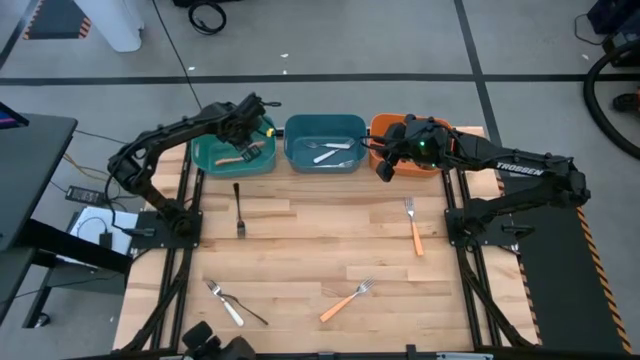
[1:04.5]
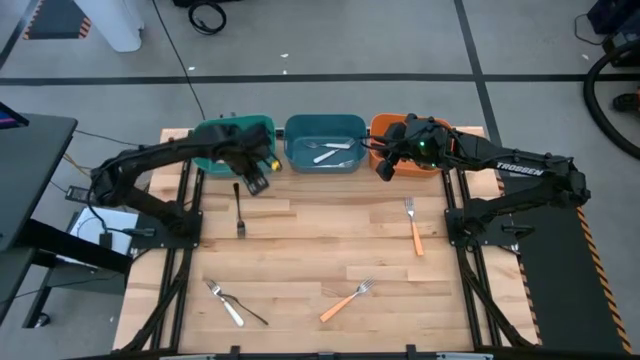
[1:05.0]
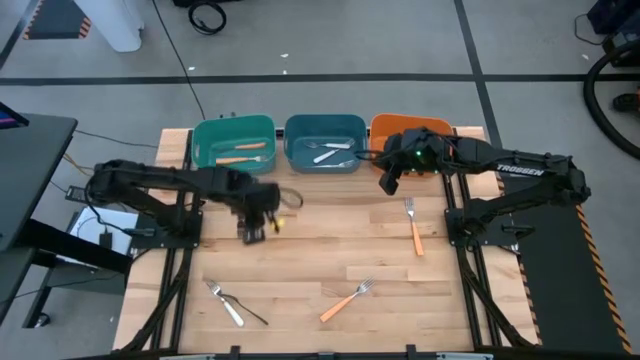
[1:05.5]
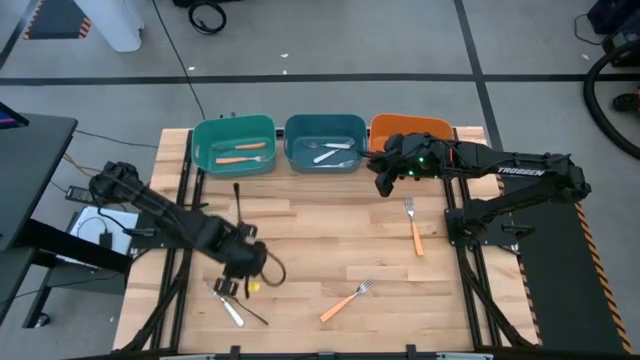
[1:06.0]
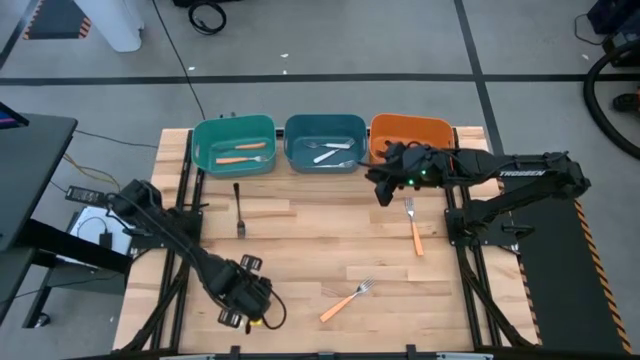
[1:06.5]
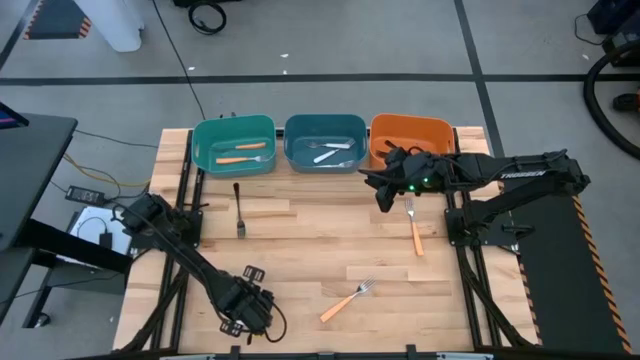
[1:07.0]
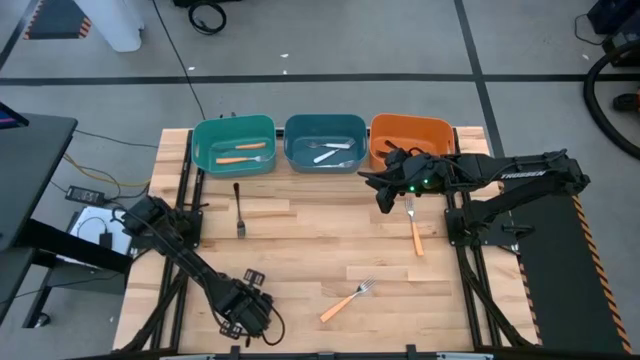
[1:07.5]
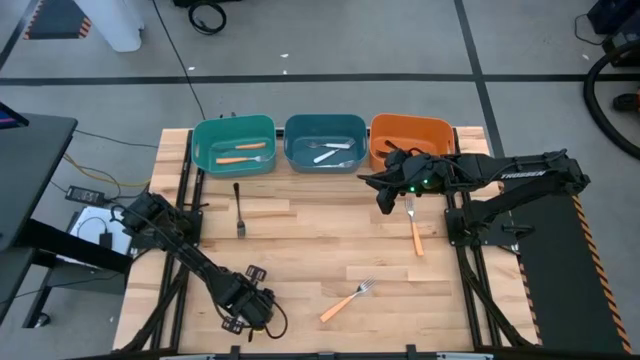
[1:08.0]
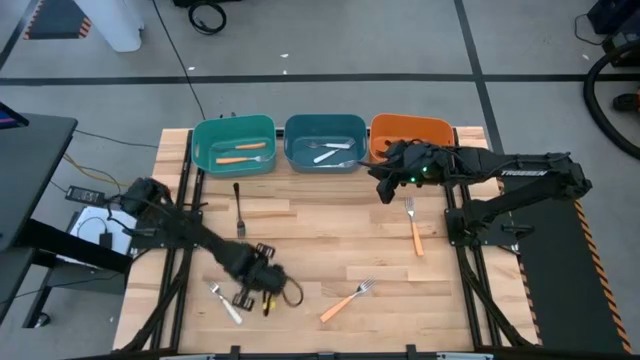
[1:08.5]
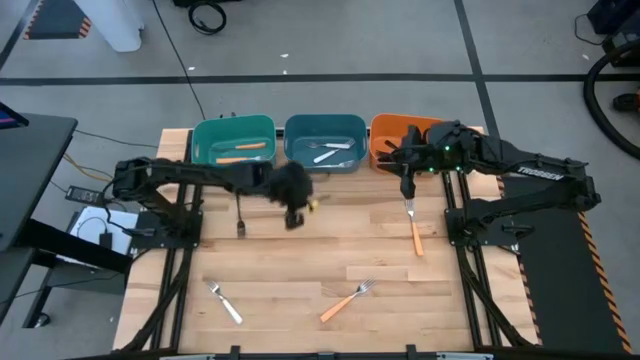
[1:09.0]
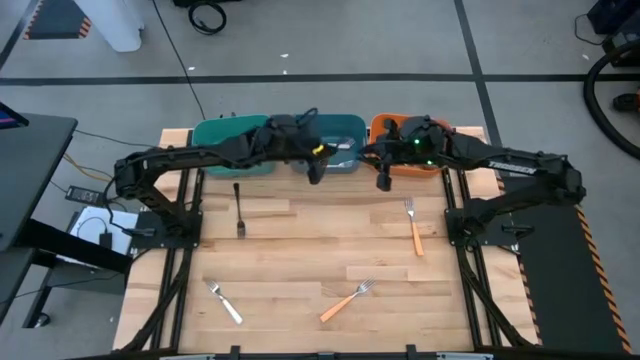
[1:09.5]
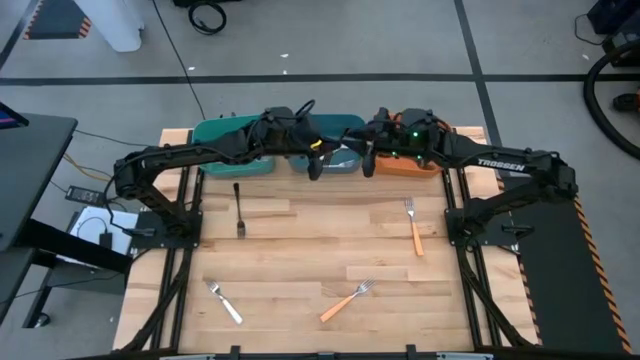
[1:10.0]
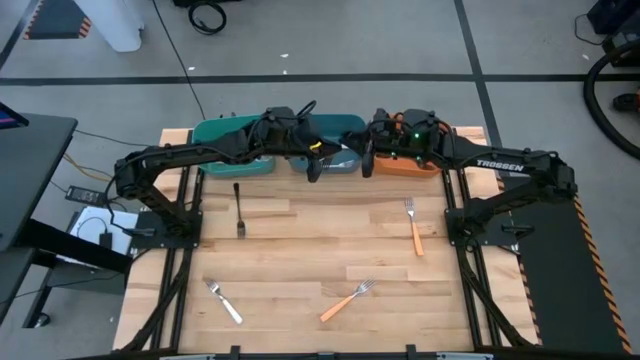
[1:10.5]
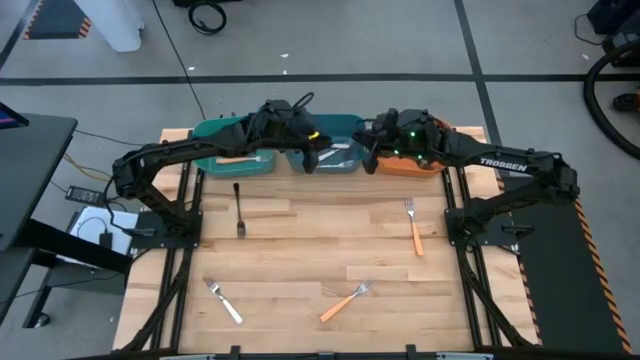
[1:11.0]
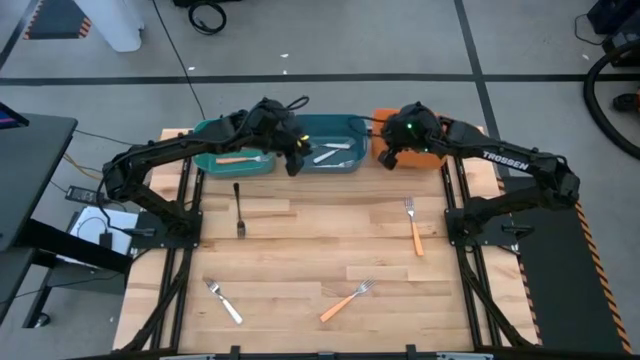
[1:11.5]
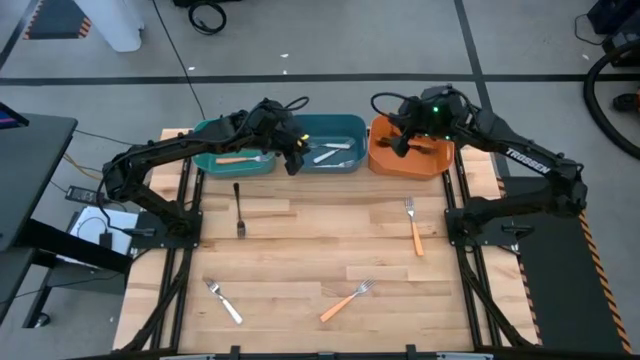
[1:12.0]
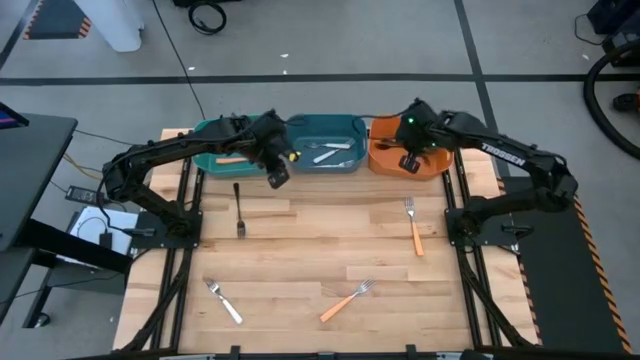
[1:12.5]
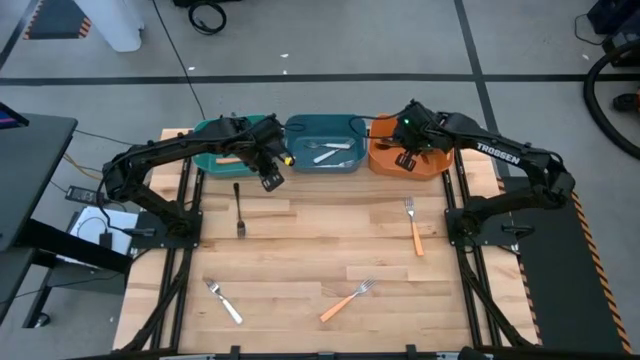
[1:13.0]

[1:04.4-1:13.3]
Task: Sort silverware by color (type)
Put the black fork into the orange bin

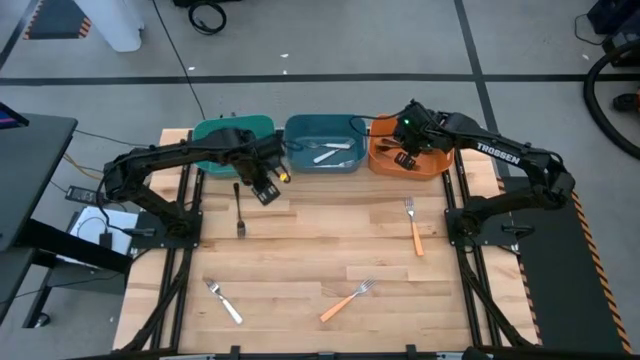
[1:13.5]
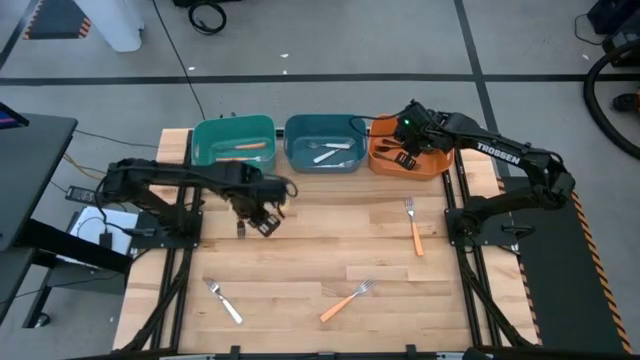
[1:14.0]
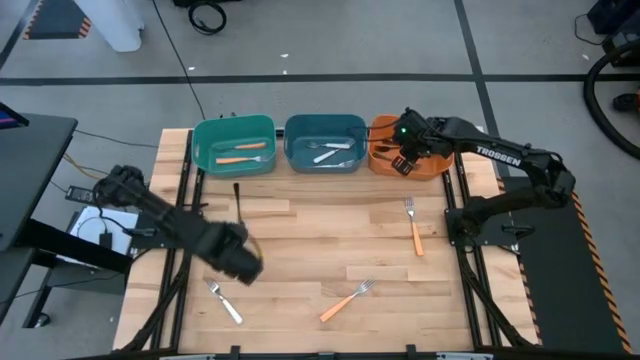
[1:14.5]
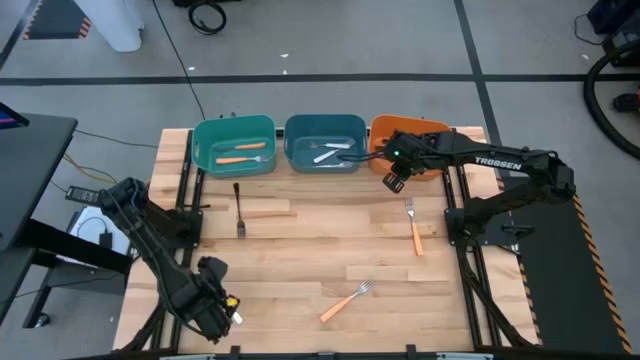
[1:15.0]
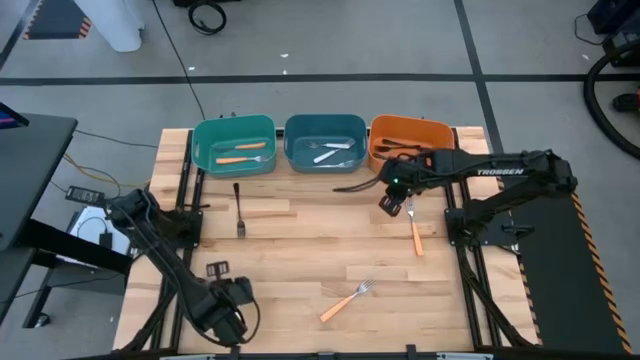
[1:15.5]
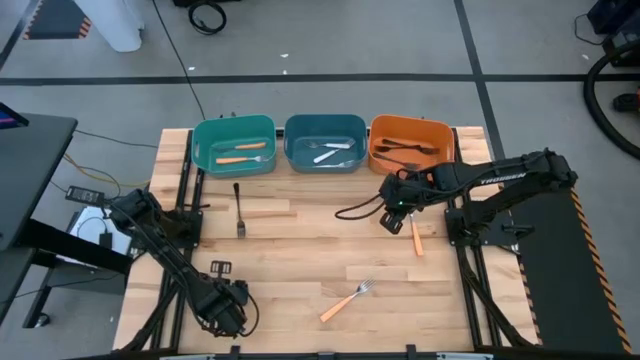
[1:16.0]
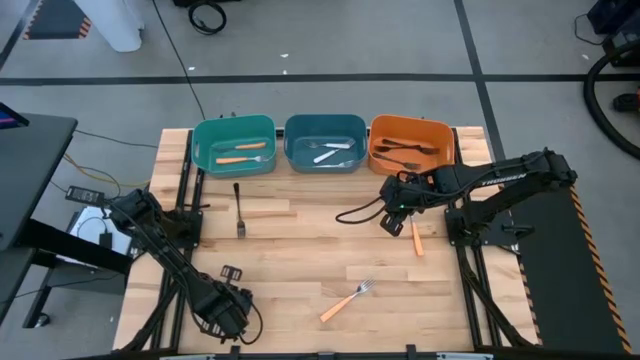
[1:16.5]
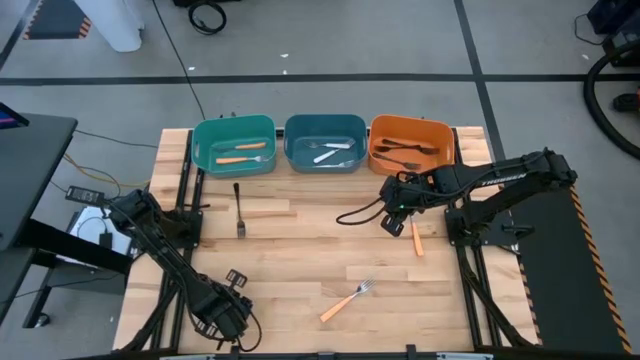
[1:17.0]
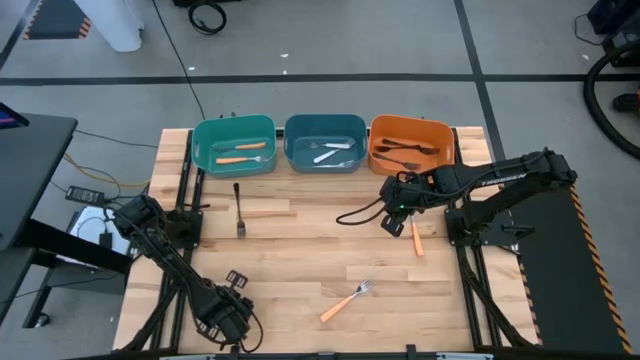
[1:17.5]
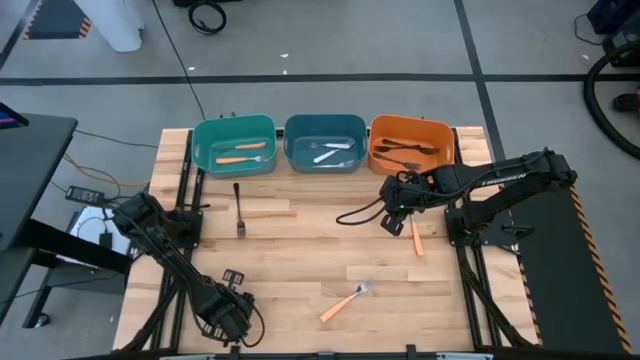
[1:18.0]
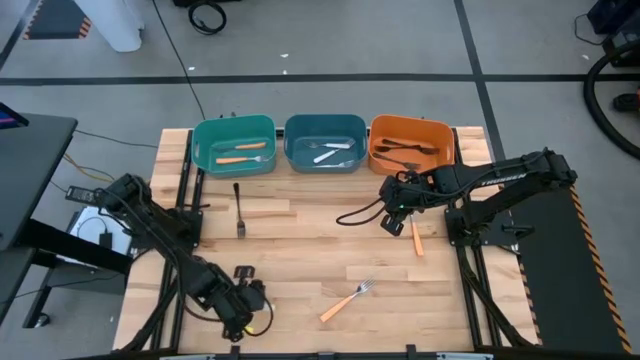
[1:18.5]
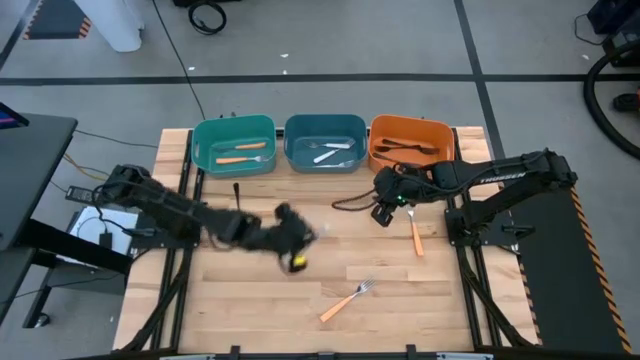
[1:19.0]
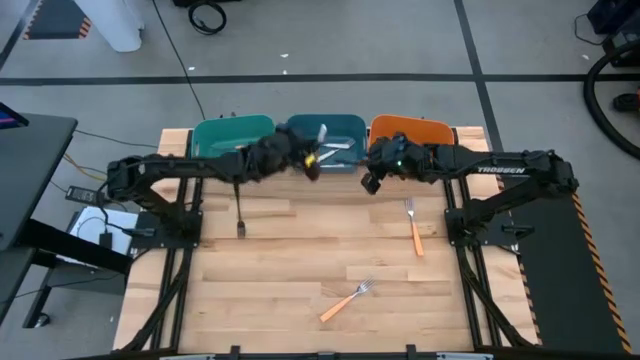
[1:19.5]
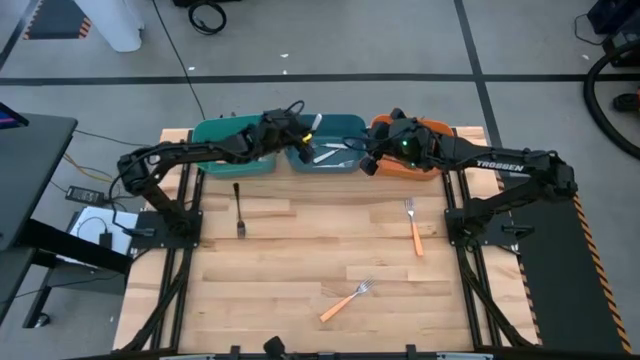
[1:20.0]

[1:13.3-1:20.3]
Put the white fork into the dark blue bin

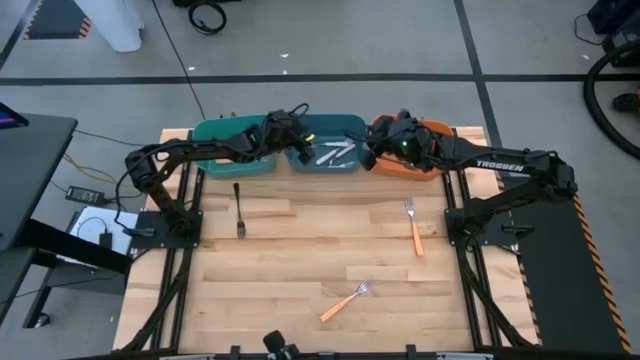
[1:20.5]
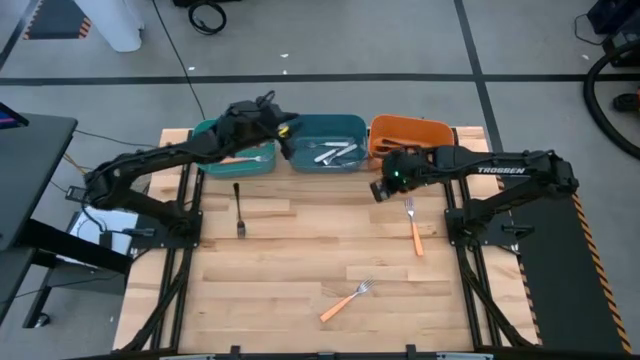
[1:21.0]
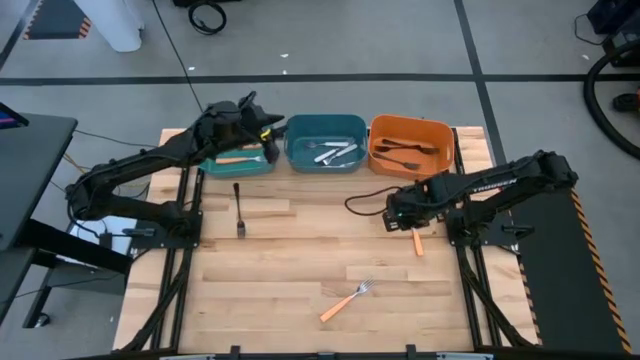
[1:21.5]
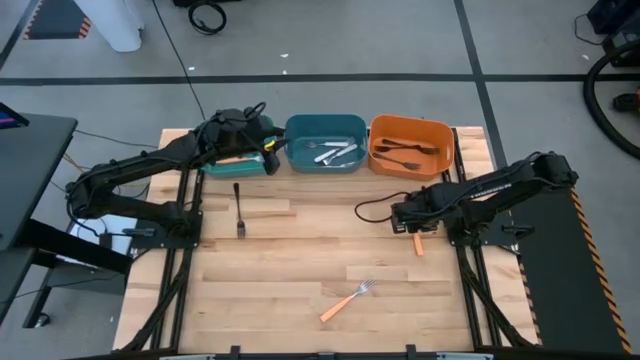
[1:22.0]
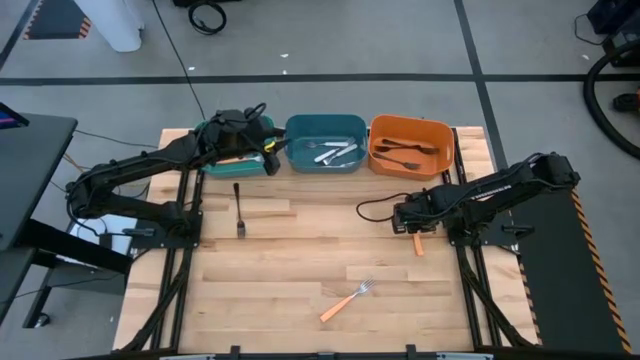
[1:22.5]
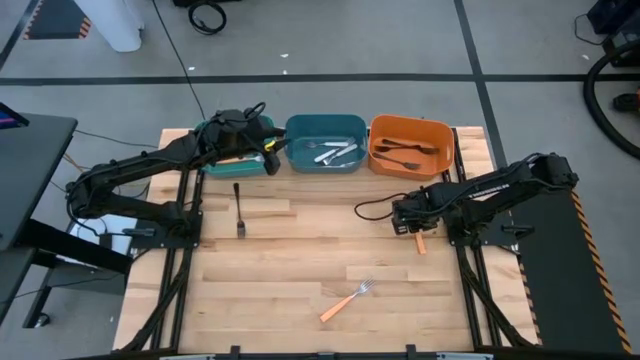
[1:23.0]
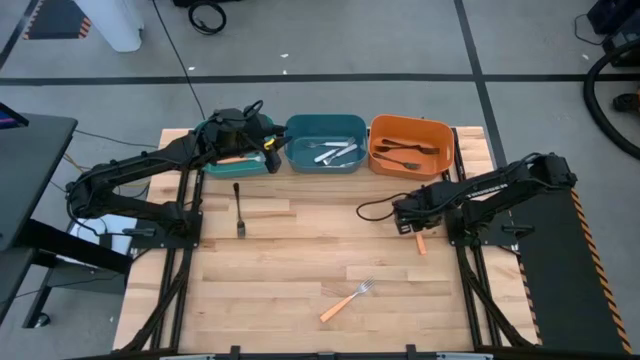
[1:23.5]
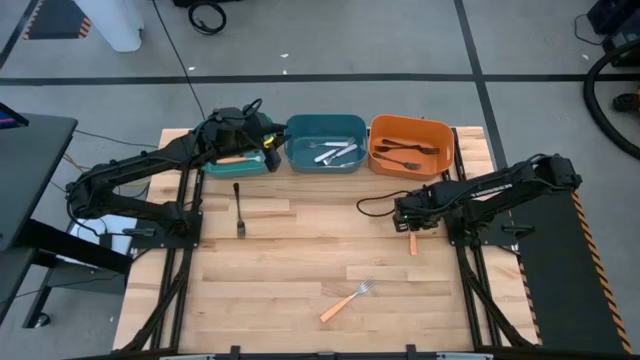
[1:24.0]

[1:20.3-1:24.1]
Put the orange fork into the green bin

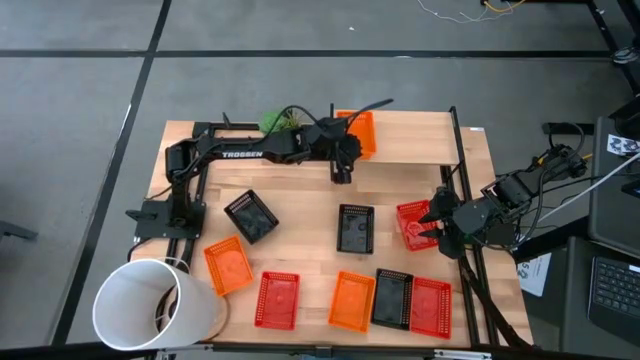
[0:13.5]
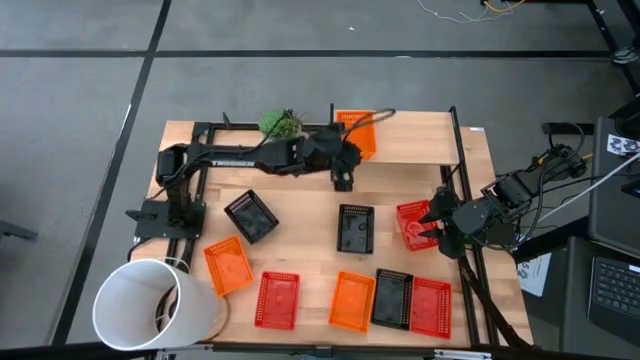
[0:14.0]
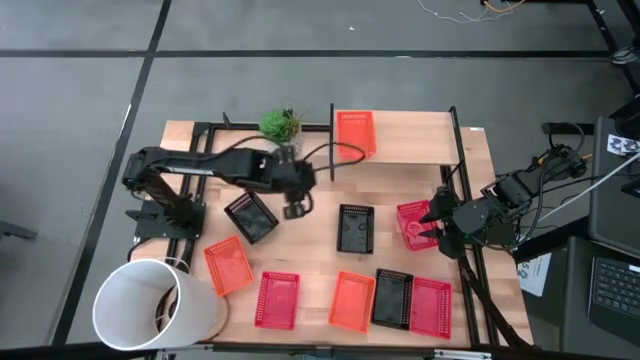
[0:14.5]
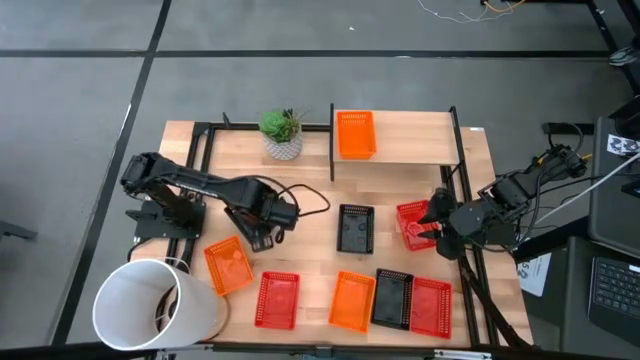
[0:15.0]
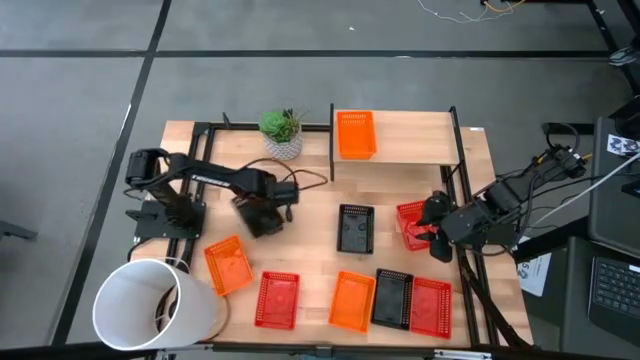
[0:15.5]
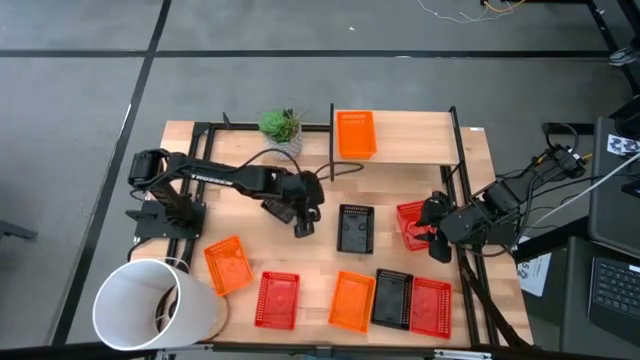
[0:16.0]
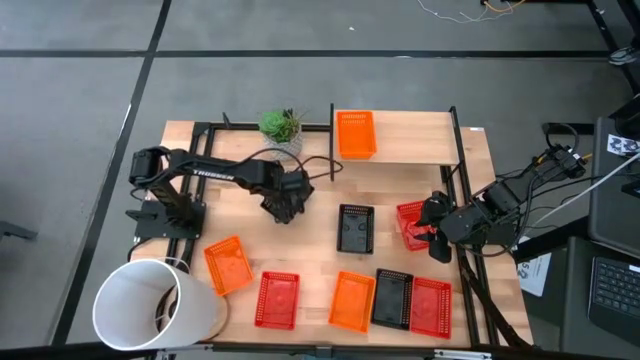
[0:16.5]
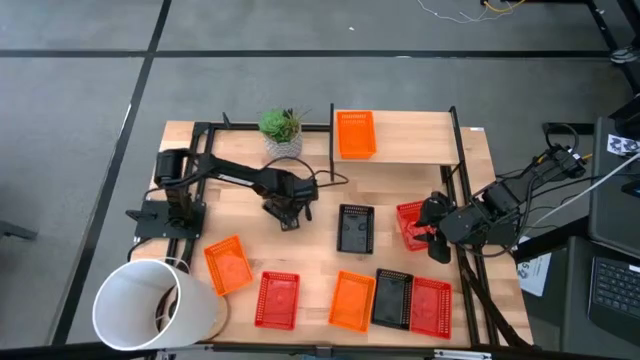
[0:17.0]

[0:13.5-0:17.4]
Task: Stack baskets on shelf by color
Move the top left black bin
